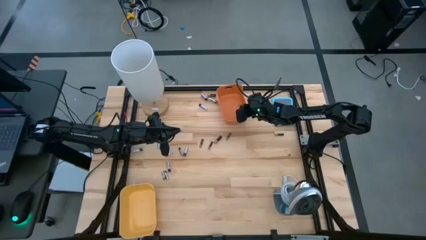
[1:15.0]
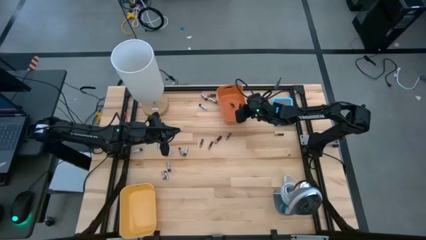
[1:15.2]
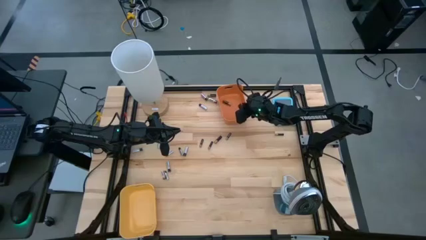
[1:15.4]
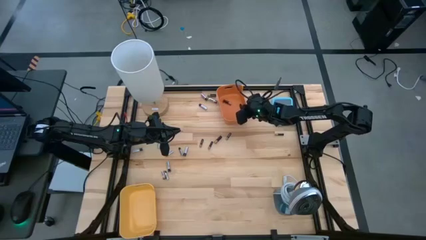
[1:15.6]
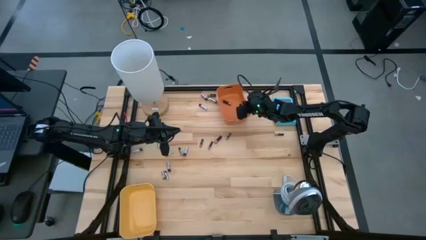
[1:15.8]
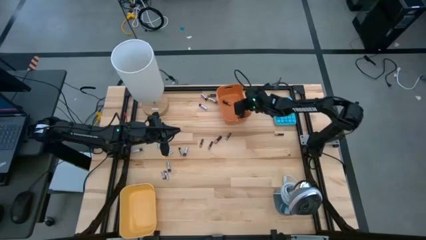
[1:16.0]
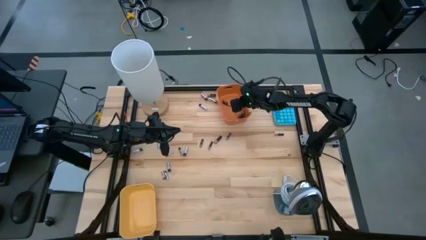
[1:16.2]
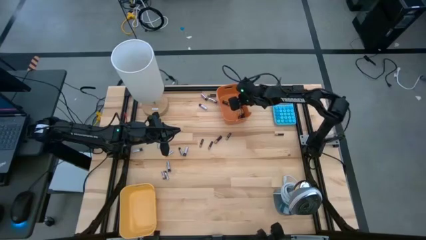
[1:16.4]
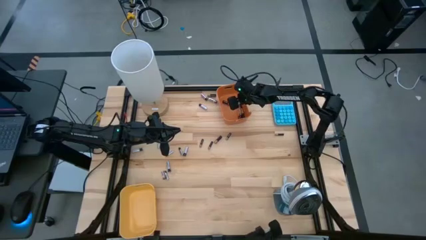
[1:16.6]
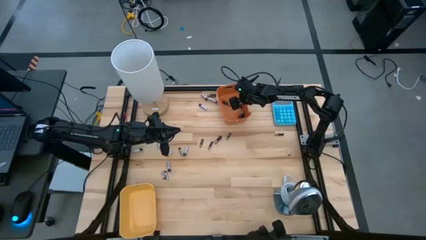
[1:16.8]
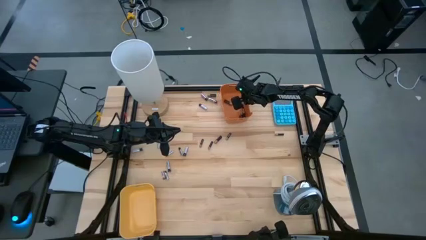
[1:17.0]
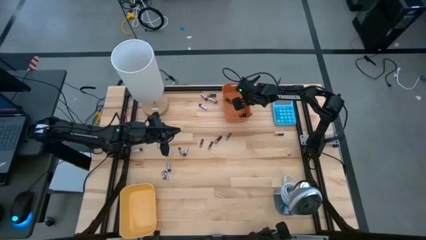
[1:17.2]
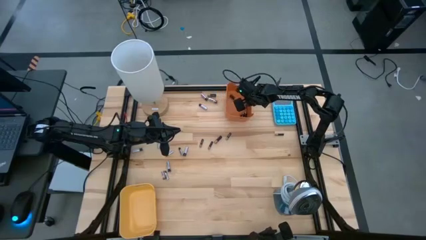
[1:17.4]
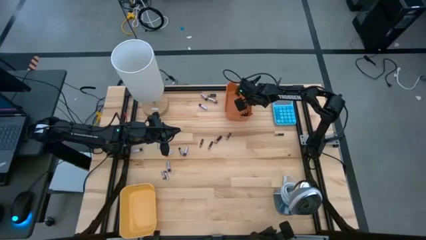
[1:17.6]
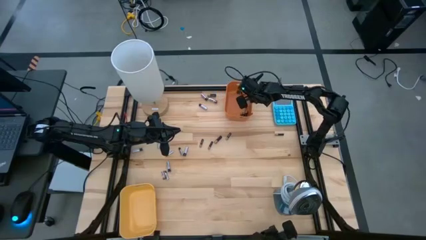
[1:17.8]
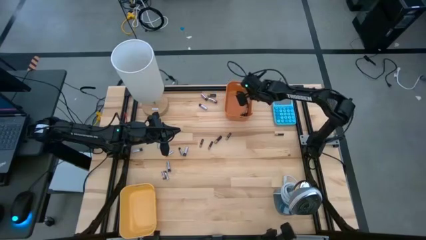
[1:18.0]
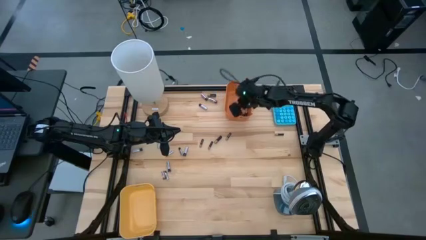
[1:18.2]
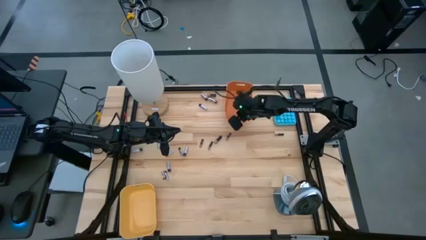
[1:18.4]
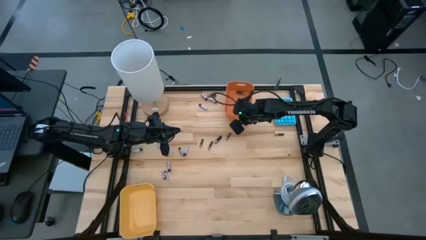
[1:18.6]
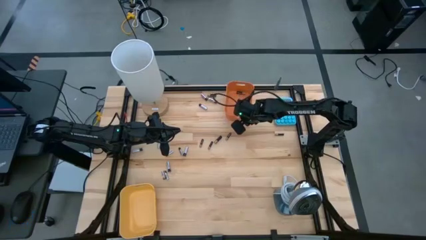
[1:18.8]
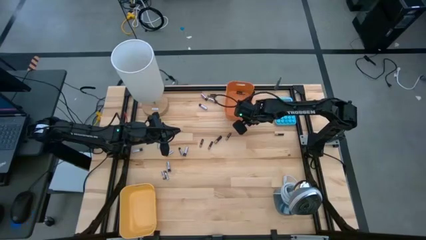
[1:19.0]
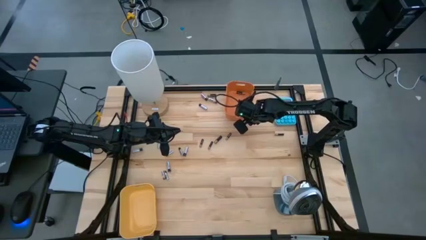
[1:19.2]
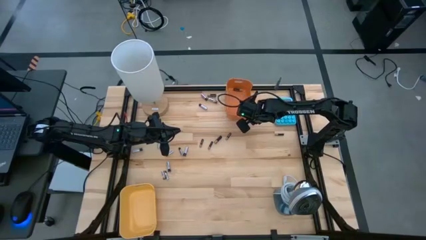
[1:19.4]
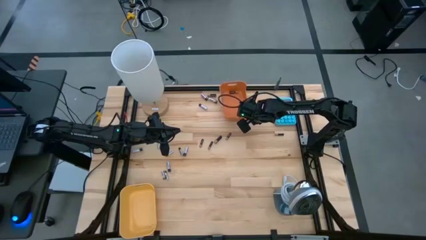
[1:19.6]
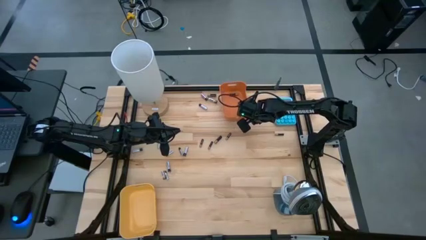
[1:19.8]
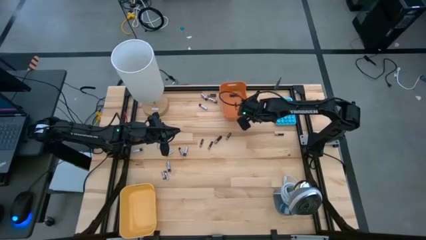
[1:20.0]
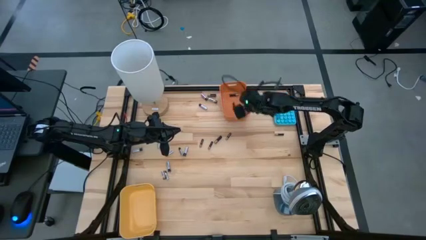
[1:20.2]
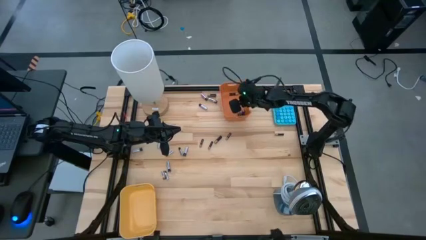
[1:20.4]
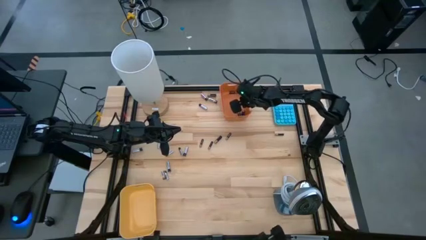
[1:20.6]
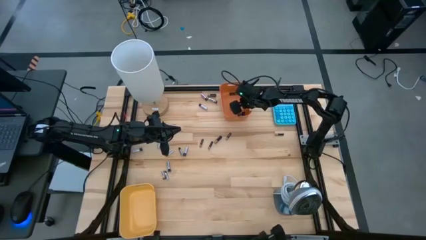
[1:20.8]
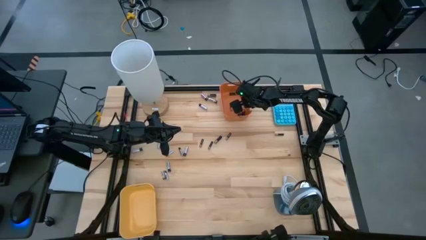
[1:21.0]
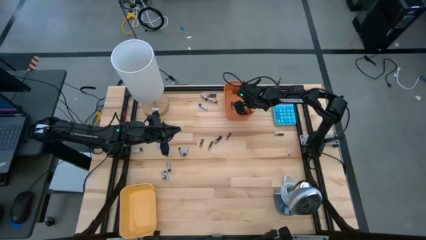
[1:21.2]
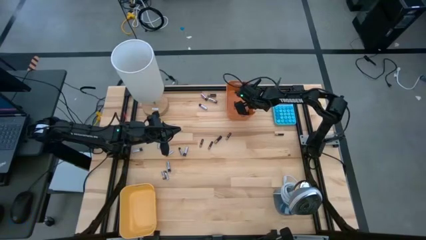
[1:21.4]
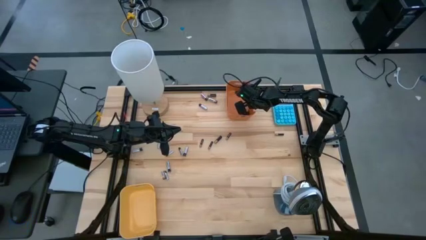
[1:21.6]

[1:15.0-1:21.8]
Task: Sort batteries
Adjust the orange bin

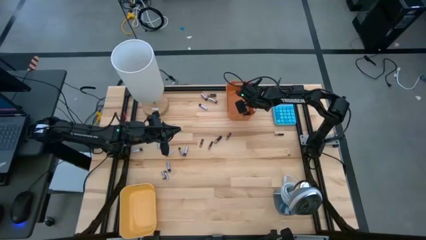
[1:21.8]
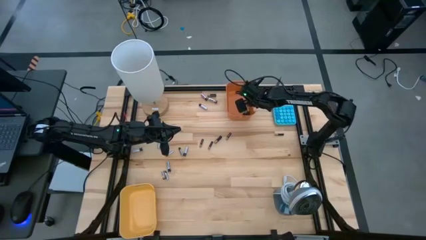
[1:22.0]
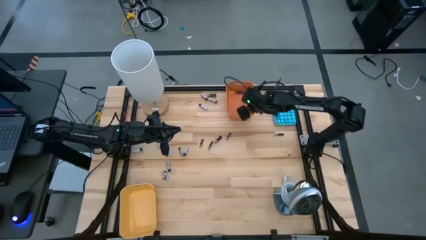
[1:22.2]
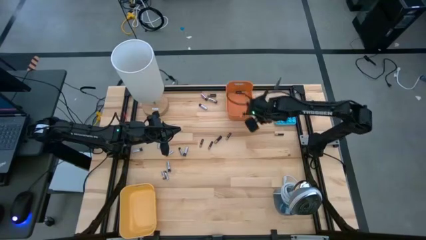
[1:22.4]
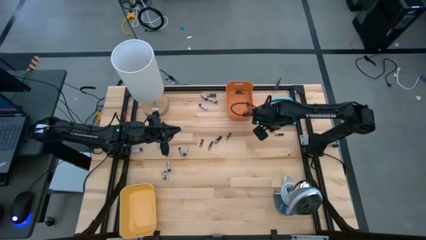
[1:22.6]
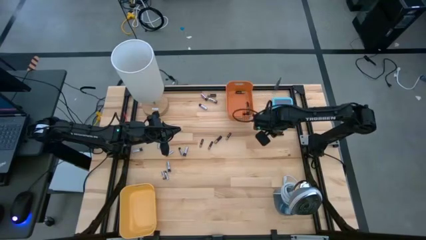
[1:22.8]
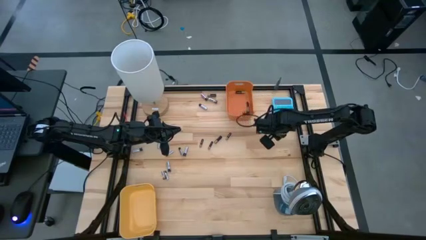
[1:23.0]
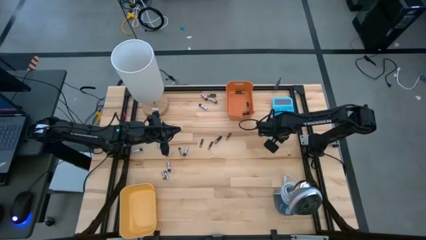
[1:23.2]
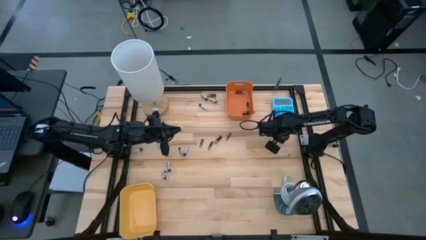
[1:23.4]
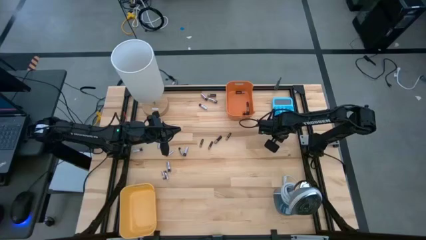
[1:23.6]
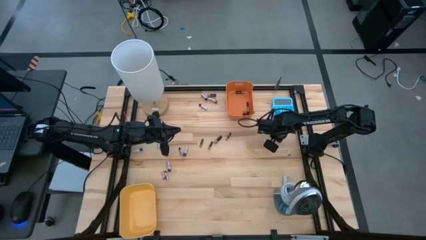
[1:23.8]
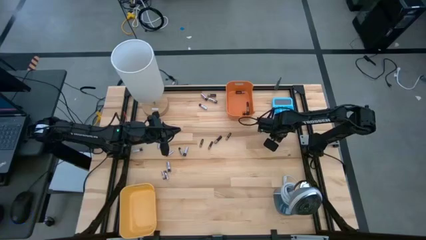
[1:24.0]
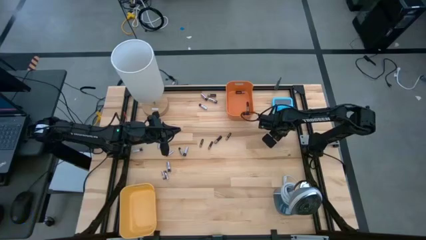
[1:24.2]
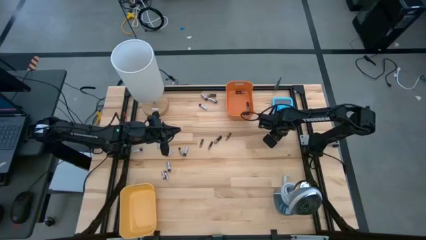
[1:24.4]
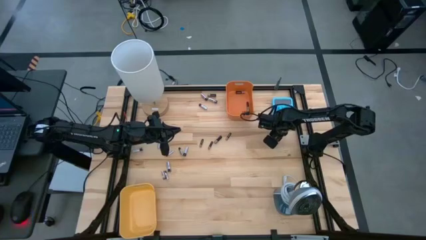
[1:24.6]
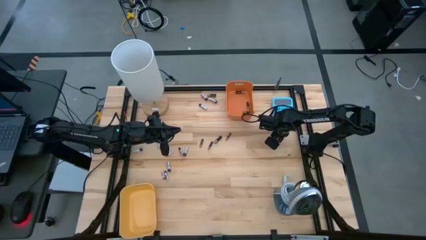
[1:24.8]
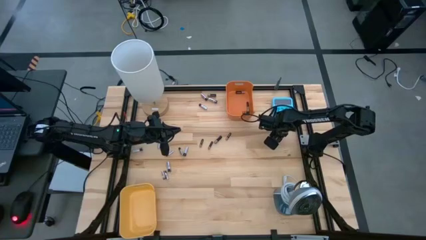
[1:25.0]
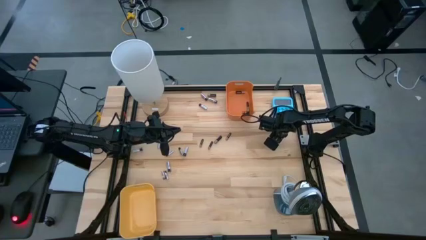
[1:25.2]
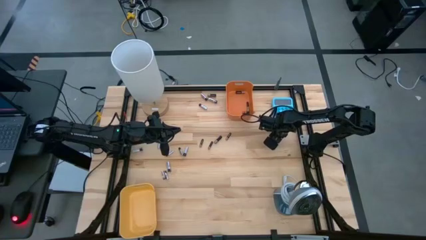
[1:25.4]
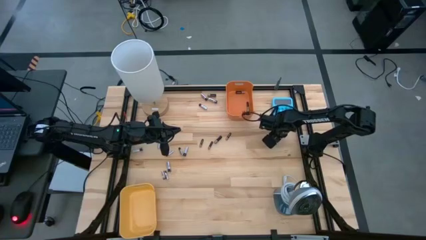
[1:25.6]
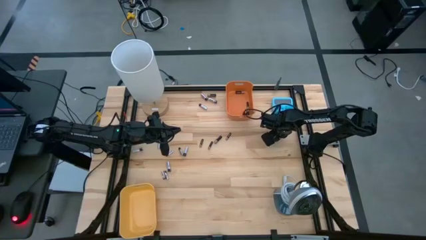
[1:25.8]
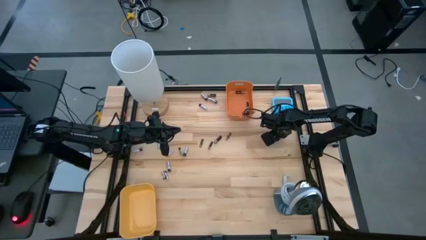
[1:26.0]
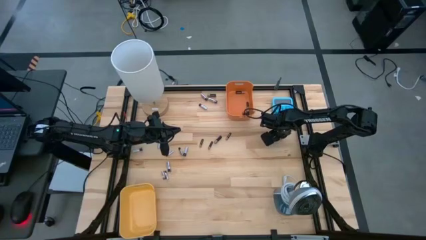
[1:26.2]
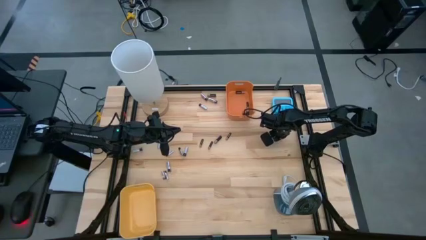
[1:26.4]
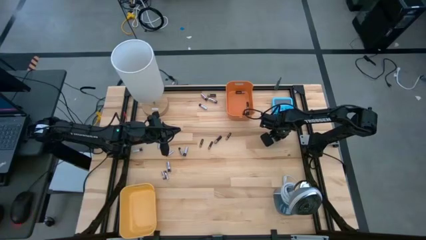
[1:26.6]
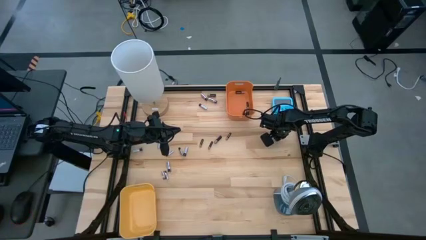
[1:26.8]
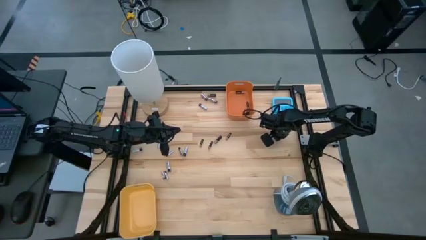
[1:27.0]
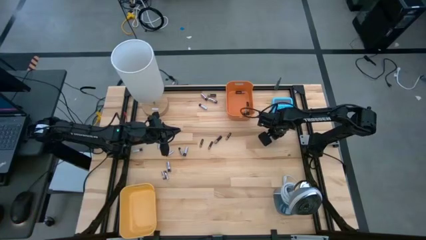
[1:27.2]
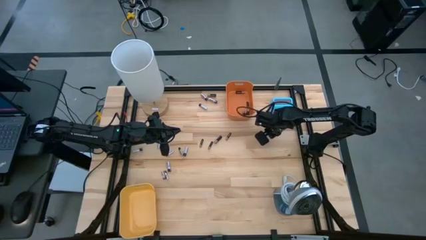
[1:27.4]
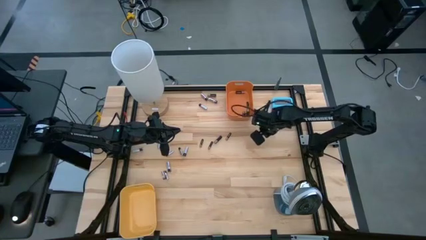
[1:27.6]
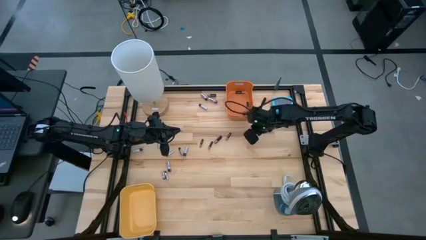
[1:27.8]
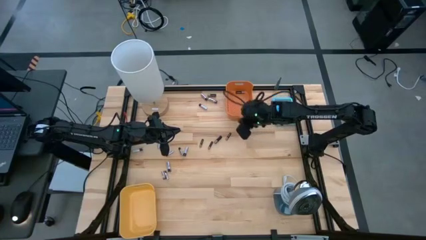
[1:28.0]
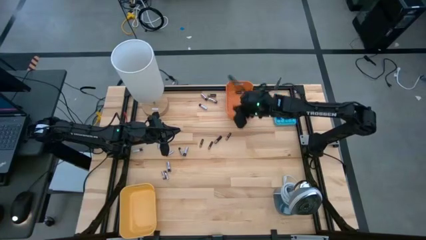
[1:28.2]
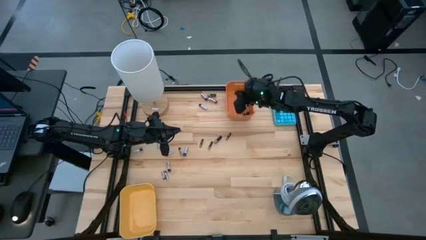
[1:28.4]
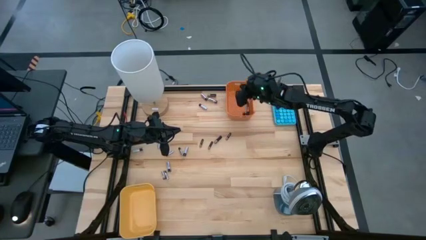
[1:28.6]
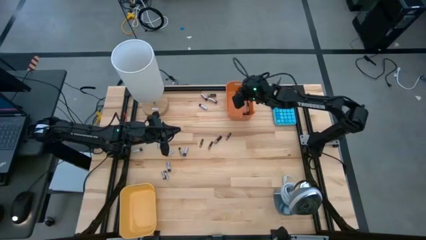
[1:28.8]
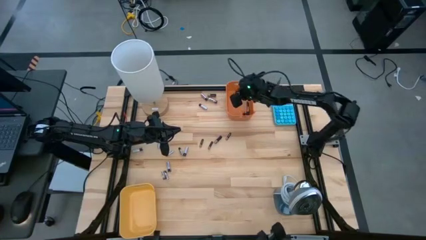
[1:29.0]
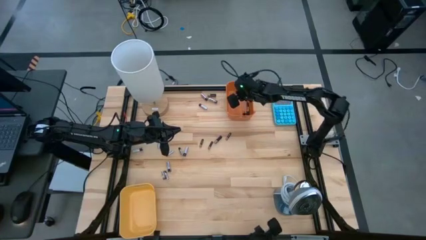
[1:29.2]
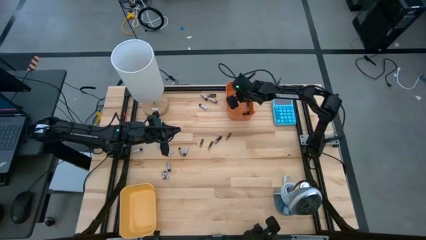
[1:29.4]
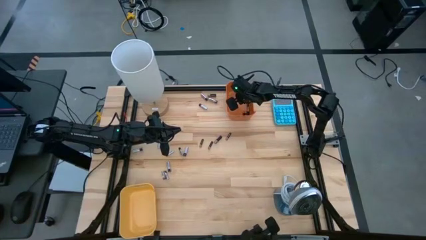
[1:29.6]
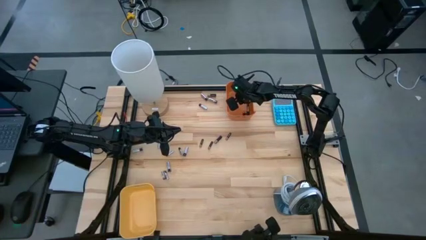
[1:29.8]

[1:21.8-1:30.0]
Put the black battery into the orange bin
